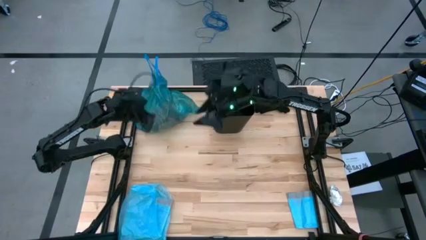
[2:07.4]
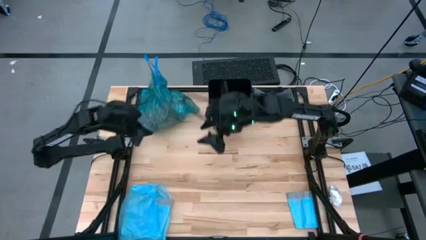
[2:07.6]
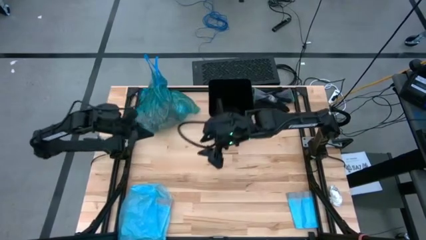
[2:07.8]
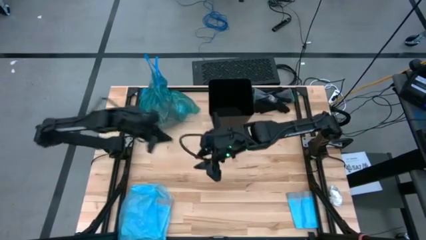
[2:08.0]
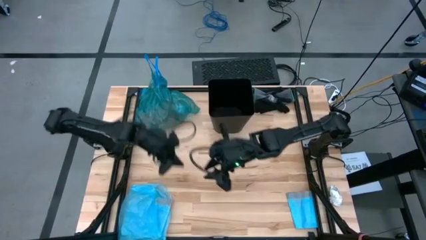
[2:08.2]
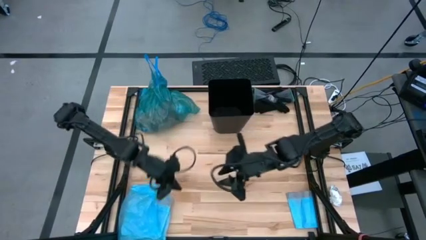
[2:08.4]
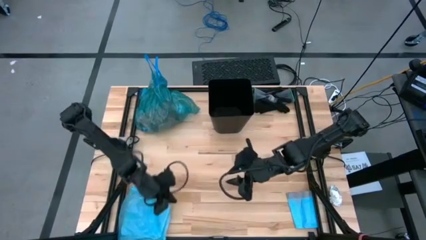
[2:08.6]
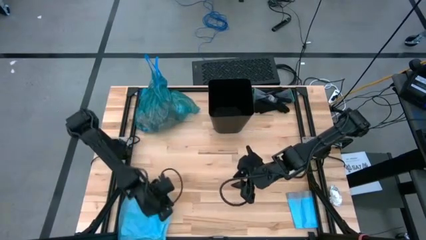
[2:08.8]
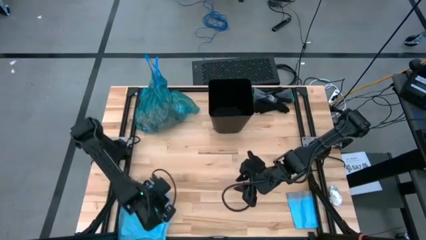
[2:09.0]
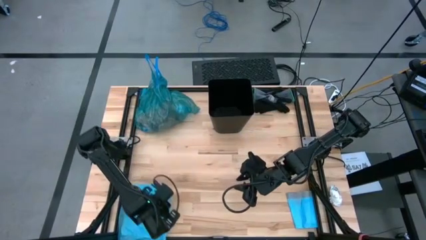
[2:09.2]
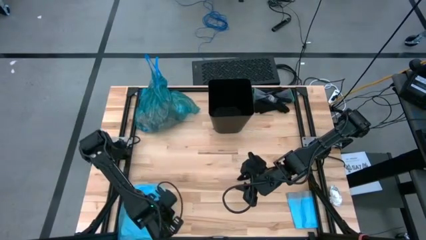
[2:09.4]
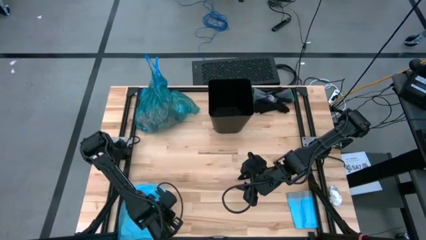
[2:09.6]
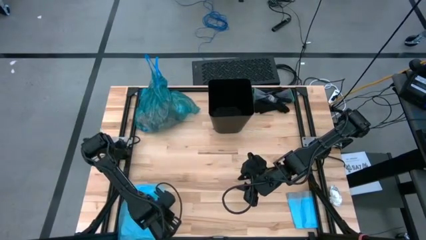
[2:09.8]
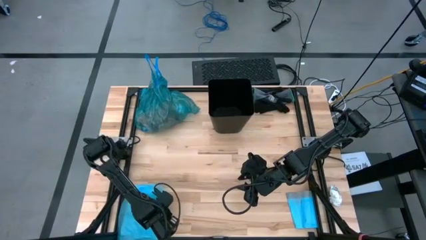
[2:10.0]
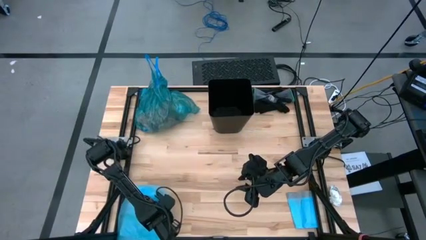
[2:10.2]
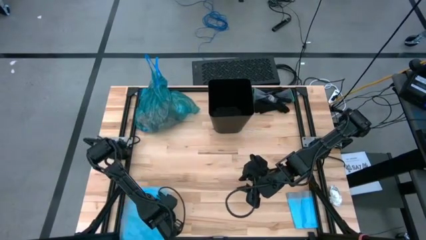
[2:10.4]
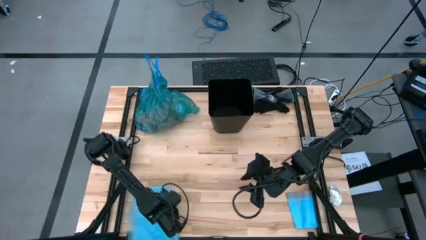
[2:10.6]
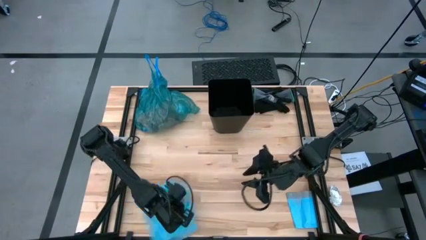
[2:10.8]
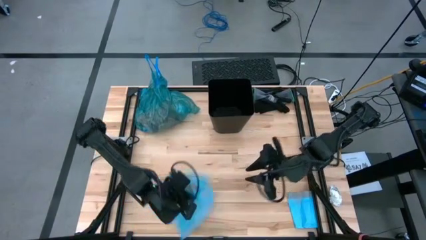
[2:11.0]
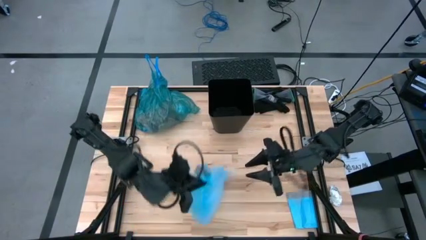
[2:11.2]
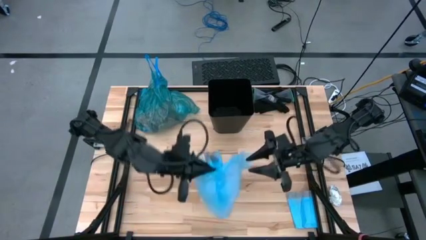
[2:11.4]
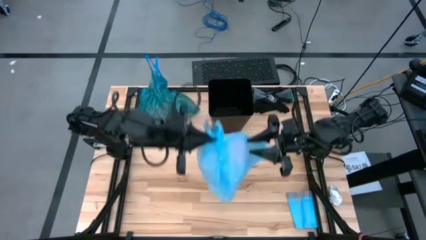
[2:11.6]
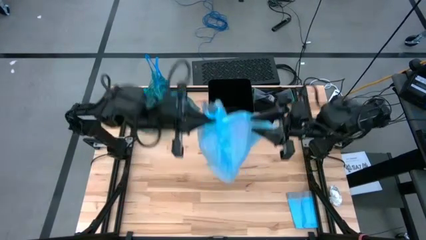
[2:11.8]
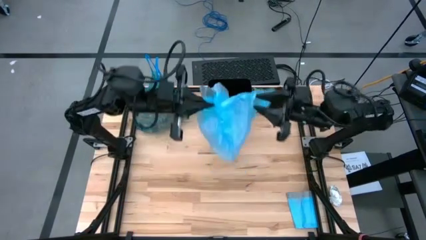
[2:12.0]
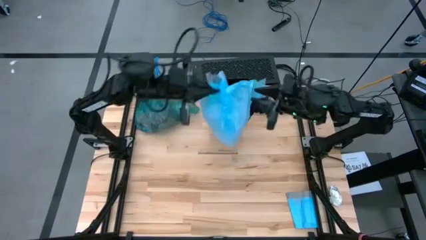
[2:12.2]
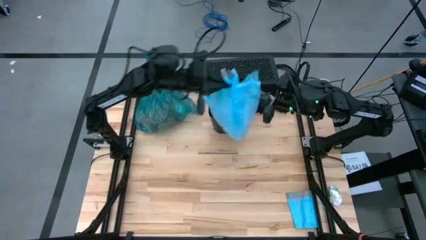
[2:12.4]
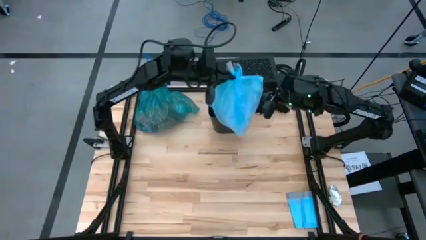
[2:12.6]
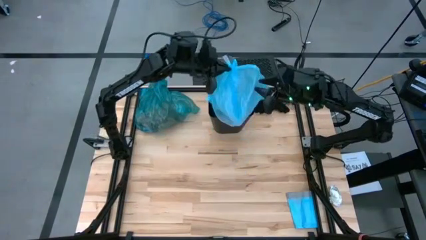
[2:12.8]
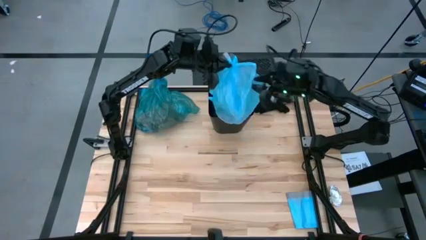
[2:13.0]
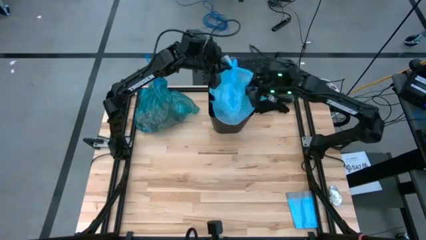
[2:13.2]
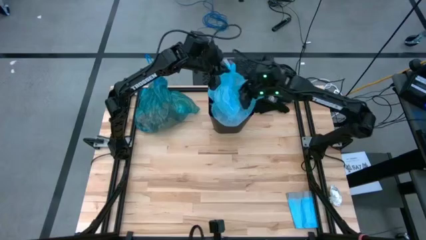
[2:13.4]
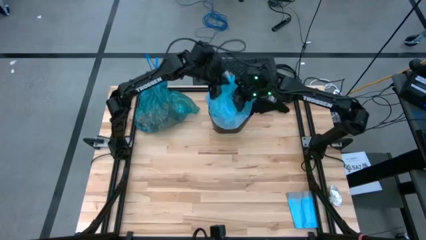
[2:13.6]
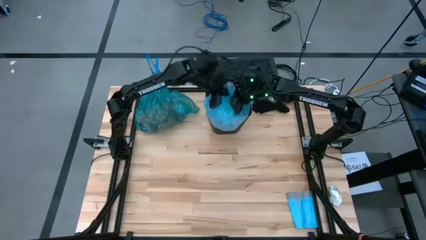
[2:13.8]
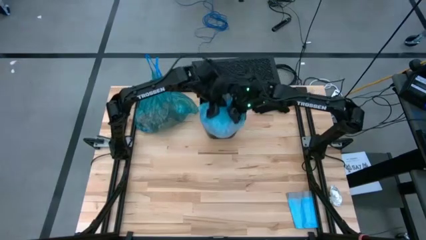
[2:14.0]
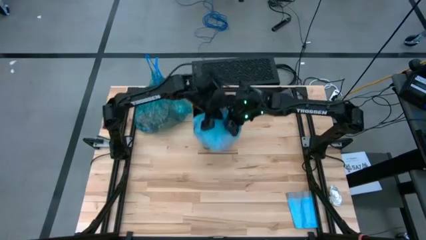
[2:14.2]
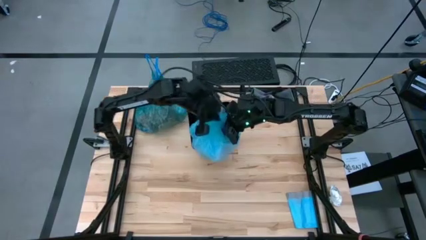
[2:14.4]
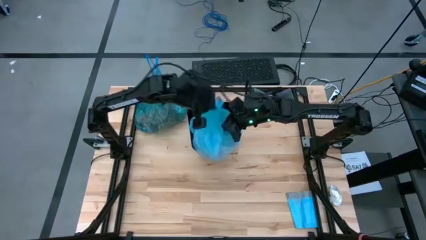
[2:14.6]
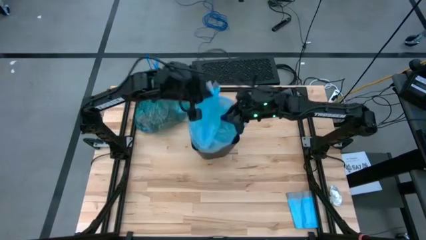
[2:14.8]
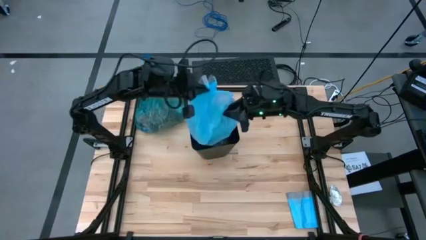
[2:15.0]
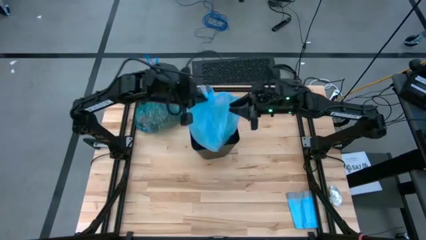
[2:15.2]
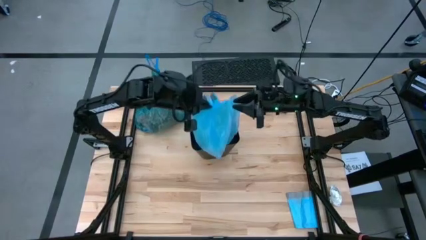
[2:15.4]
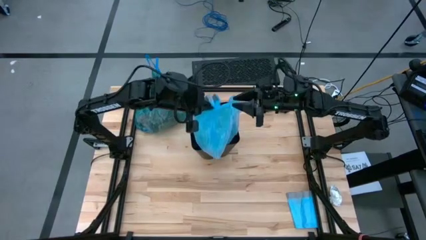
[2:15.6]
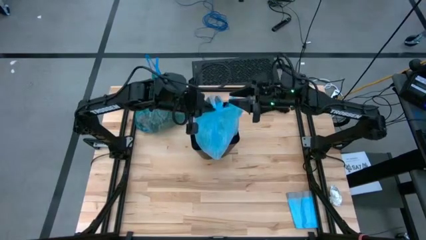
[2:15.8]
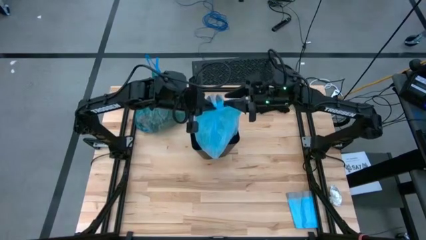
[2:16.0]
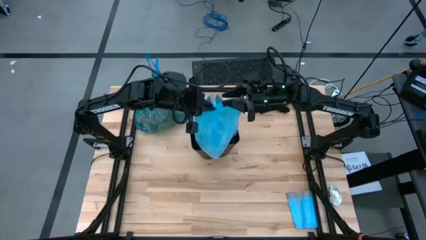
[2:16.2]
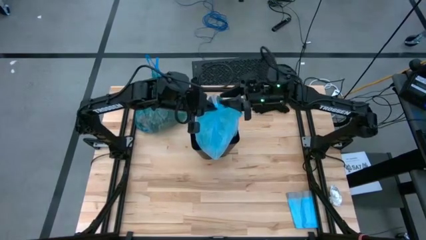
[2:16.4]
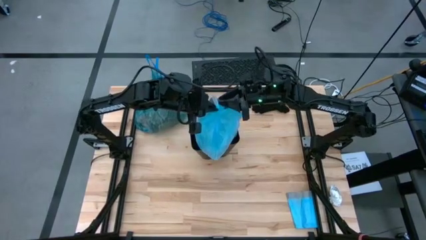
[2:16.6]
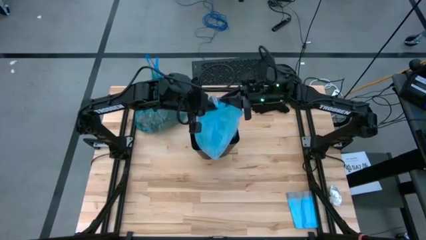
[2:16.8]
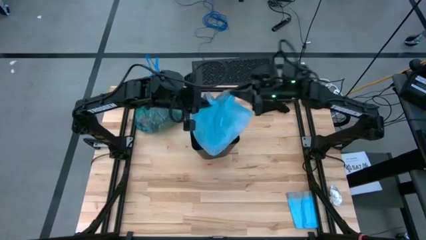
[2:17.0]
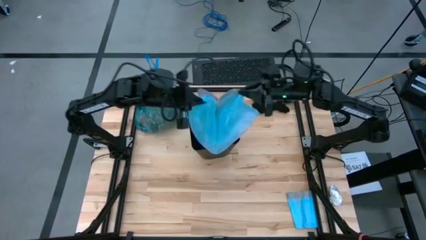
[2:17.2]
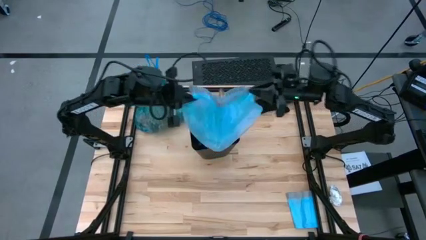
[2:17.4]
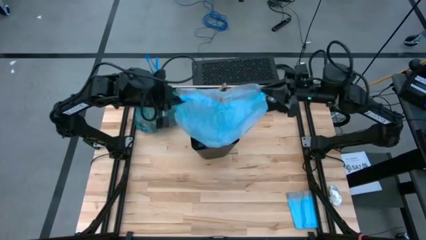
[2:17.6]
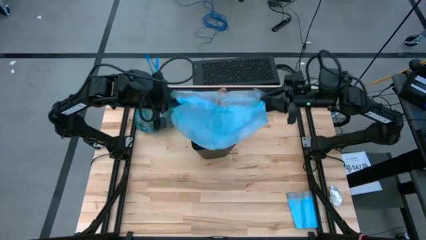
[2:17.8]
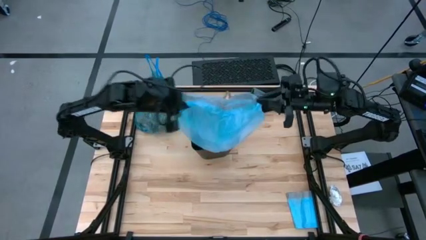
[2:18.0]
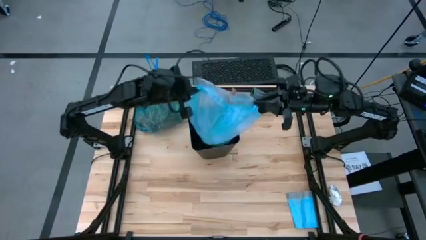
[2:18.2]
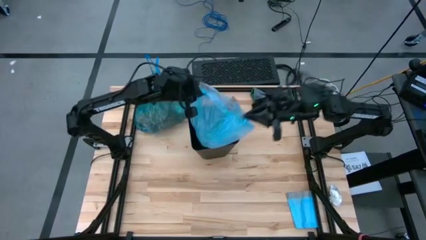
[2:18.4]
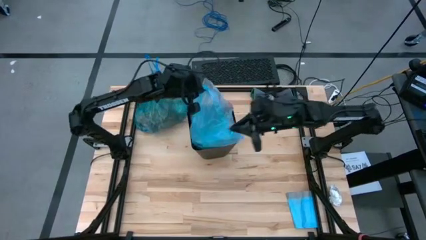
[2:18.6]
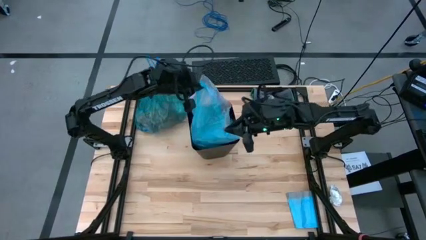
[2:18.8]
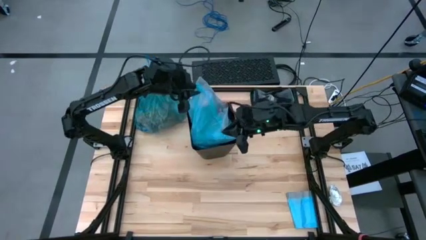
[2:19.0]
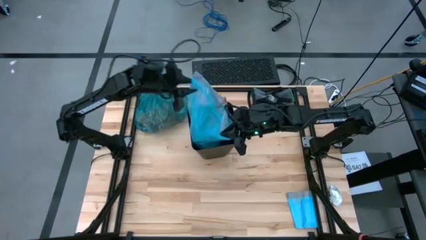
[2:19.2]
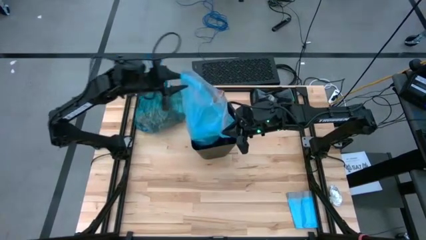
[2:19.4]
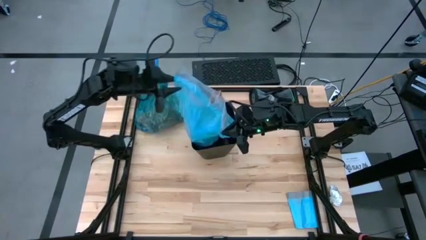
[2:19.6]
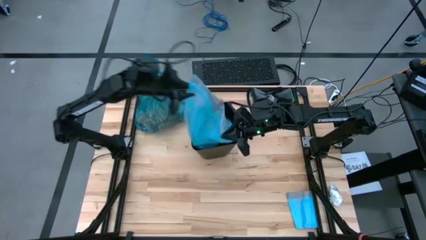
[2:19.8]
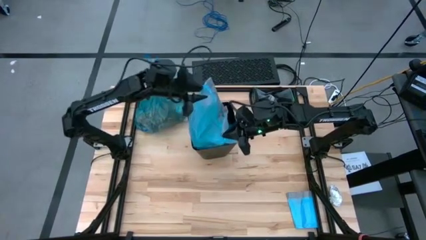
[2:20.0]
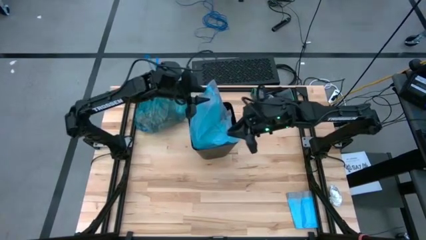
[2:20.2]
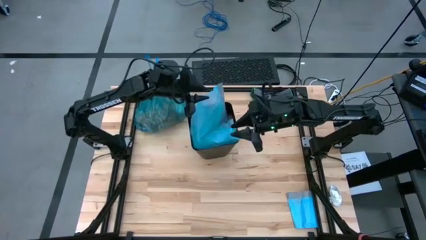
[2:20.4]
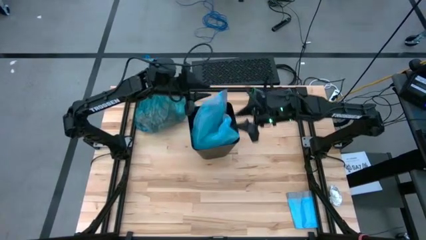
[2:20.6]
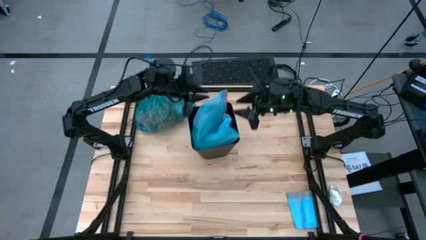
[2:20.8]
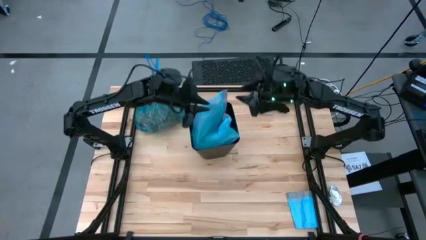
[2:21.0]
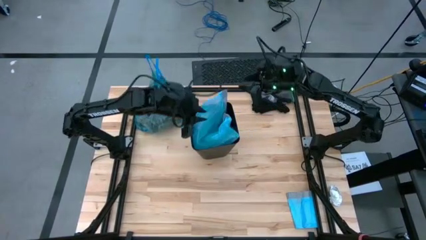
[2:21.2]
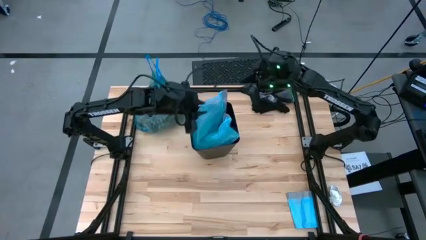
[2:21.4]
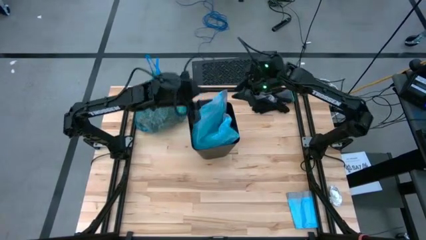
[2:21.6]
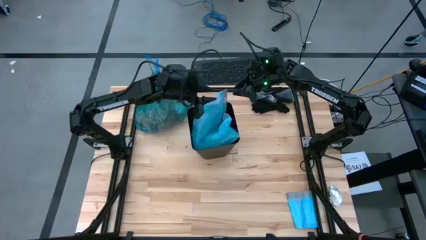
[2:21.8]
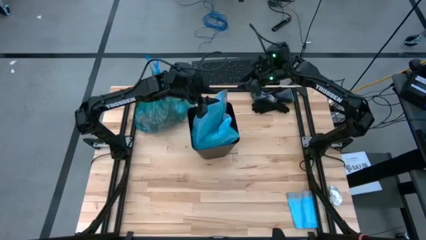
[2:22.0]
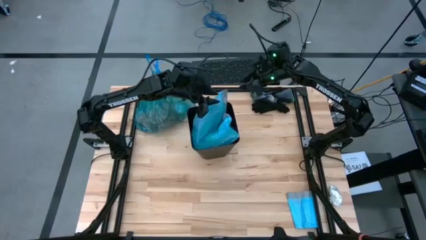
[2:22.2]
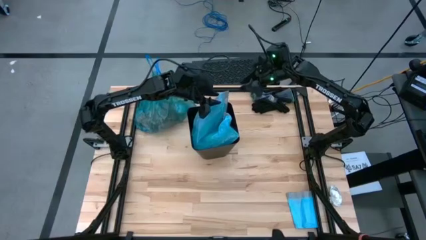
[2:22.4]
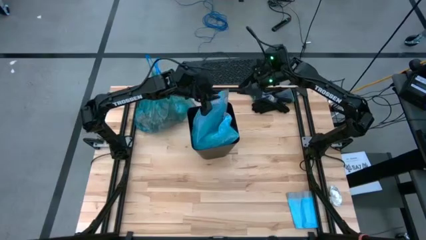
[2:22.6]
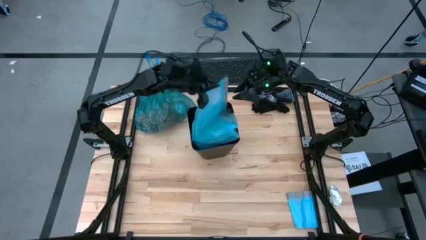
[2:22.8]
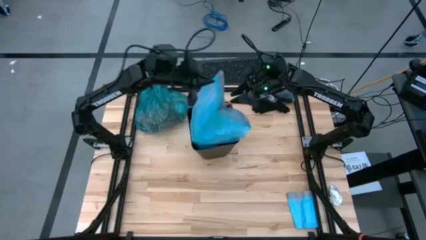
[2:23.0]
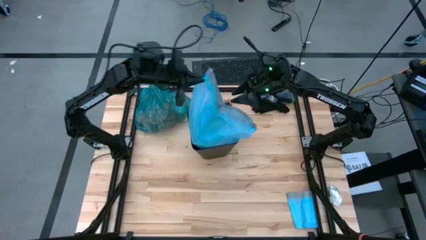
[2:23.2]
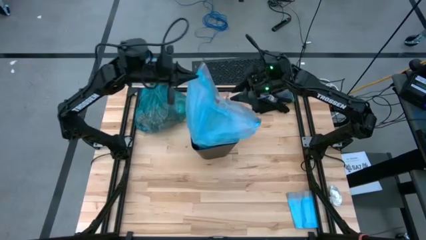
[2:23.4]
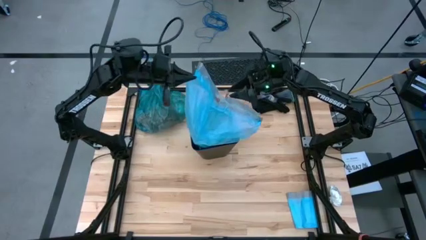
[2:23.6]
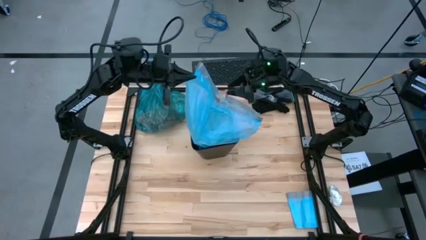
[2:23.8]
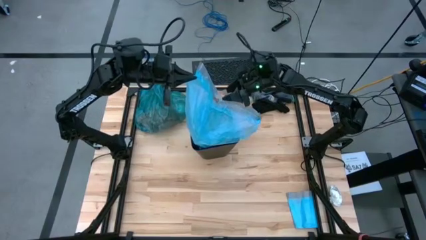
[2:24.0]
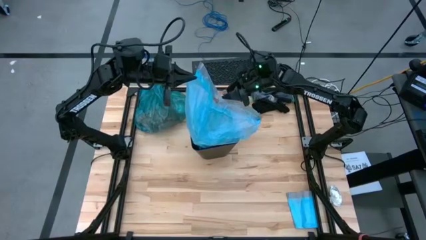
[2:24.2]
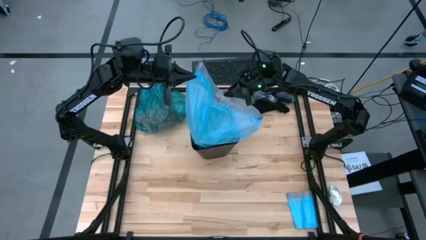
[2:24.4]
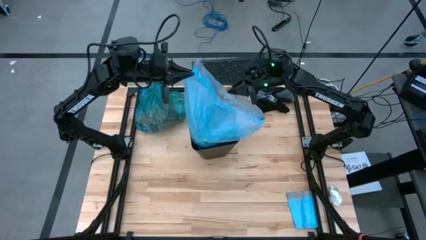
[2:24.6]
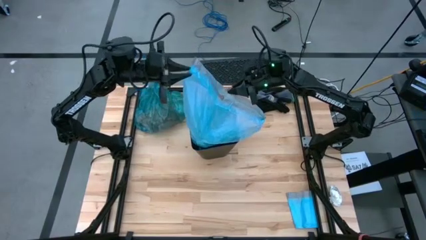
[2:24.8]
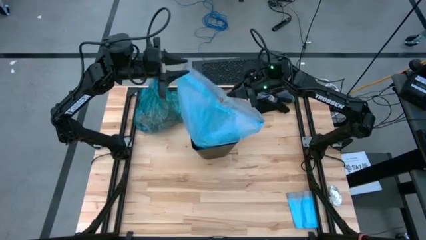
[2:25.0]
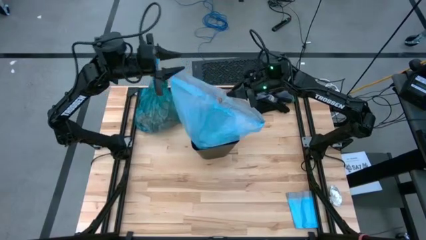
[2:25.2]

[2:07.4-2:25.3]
Task: place trash/remove bag and relplace
Put the new blue trash bag in the black trash bin
